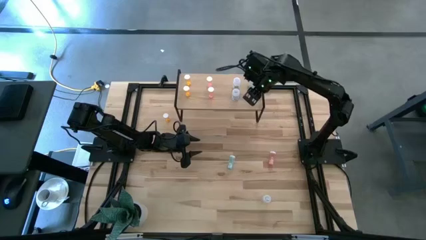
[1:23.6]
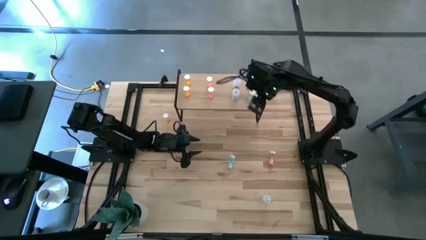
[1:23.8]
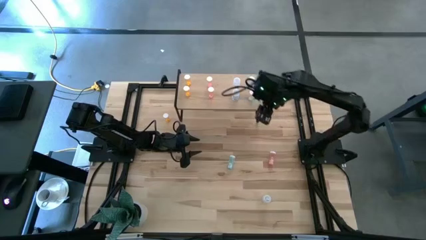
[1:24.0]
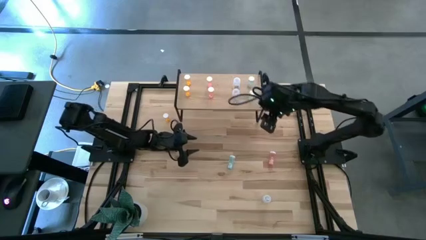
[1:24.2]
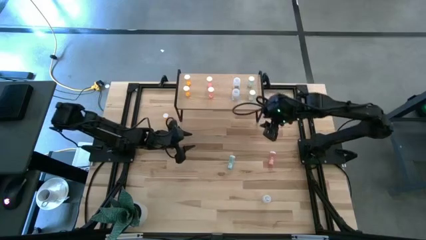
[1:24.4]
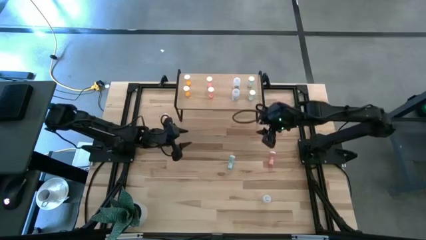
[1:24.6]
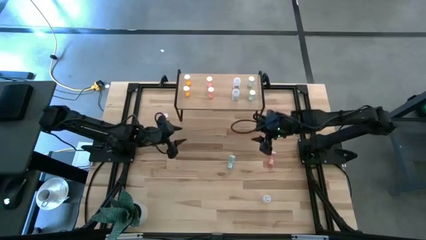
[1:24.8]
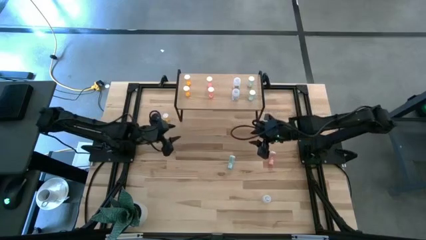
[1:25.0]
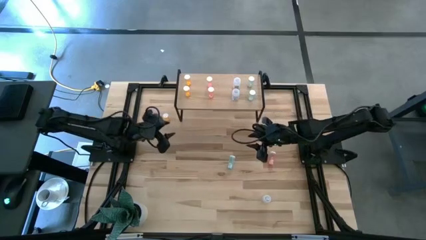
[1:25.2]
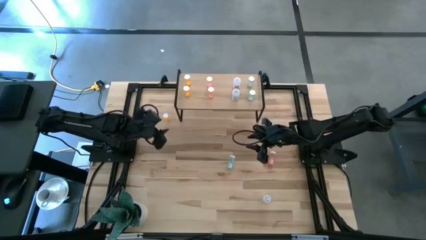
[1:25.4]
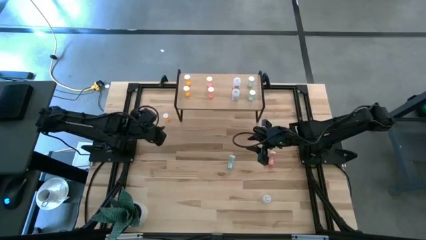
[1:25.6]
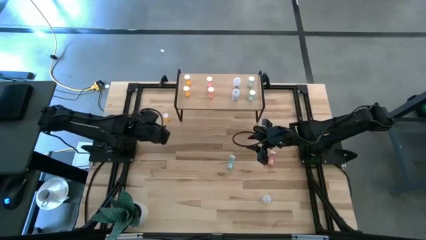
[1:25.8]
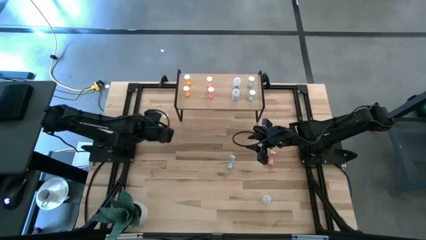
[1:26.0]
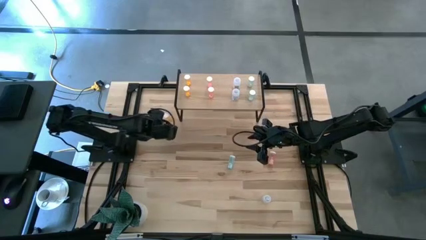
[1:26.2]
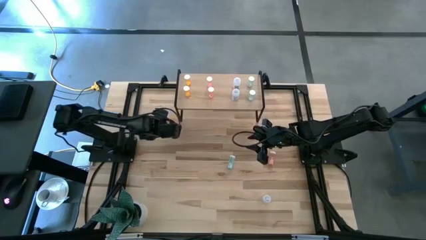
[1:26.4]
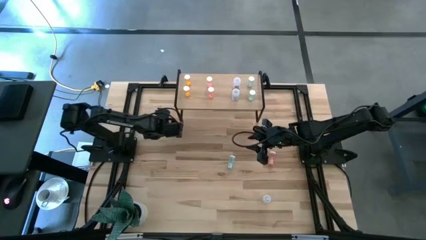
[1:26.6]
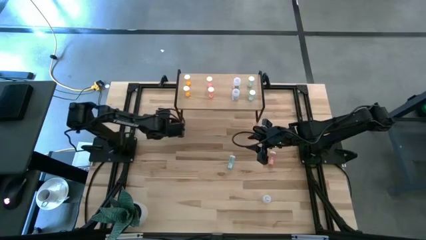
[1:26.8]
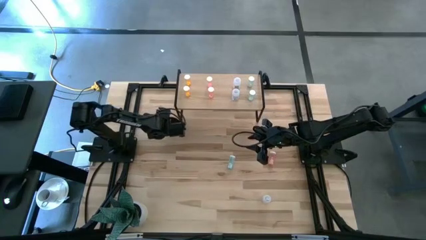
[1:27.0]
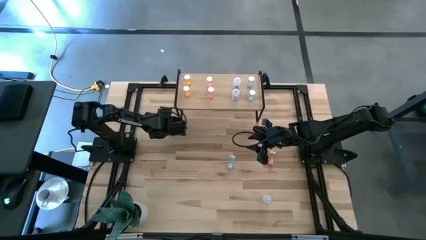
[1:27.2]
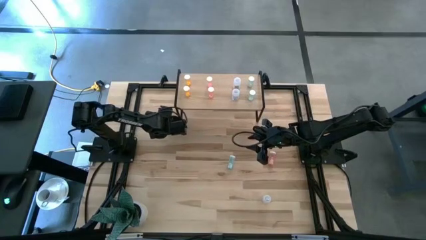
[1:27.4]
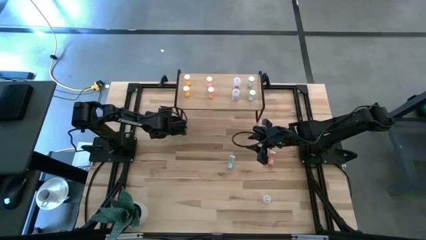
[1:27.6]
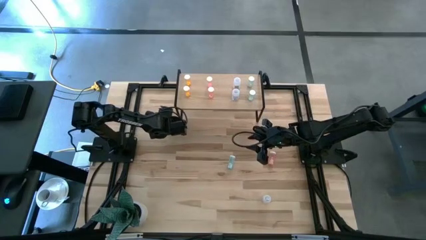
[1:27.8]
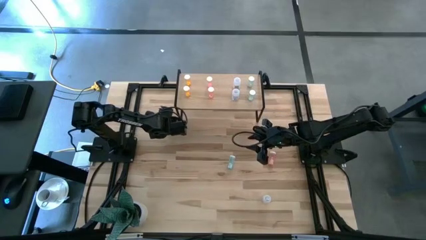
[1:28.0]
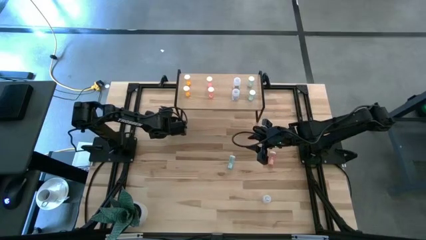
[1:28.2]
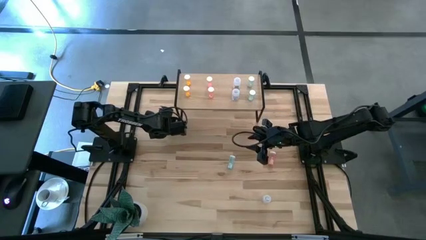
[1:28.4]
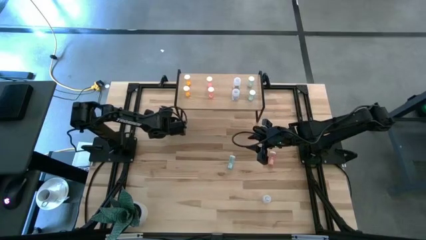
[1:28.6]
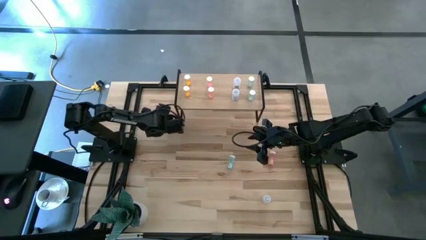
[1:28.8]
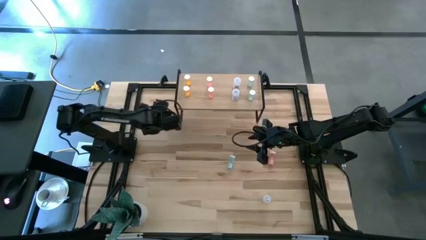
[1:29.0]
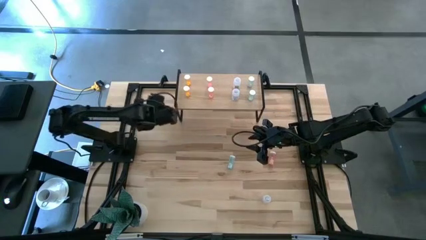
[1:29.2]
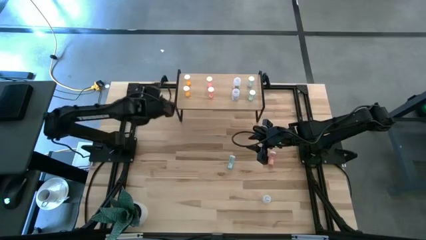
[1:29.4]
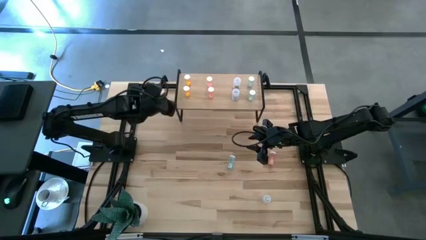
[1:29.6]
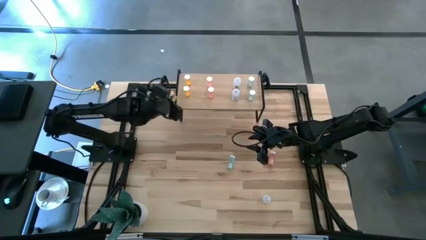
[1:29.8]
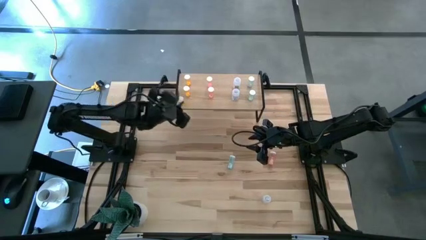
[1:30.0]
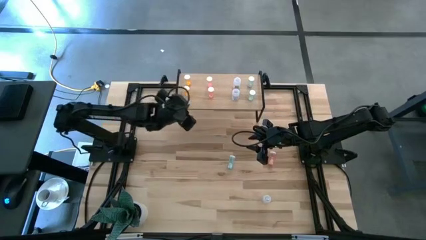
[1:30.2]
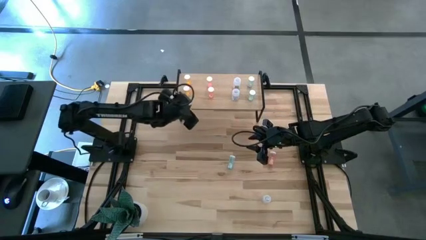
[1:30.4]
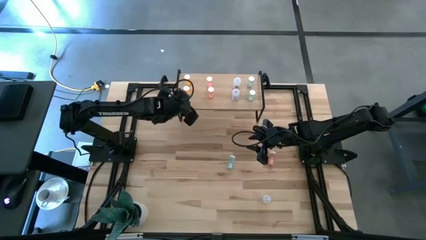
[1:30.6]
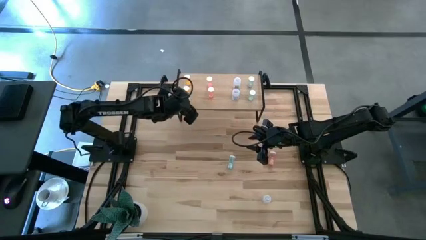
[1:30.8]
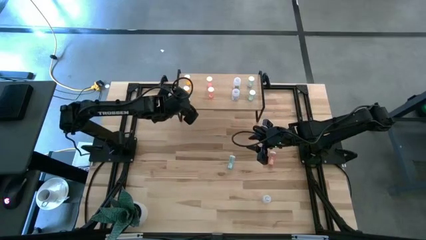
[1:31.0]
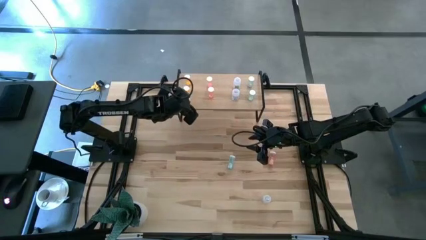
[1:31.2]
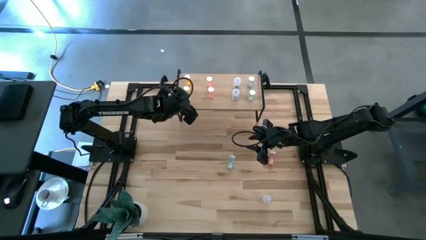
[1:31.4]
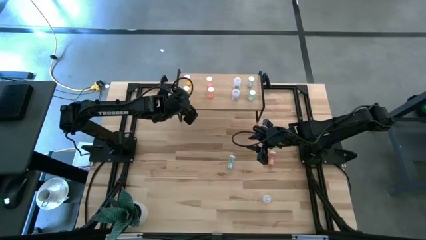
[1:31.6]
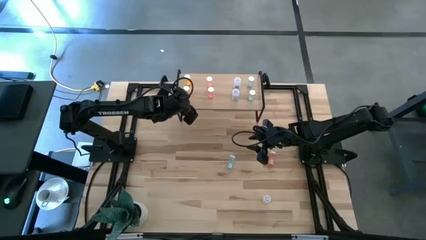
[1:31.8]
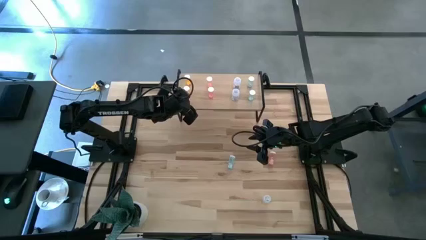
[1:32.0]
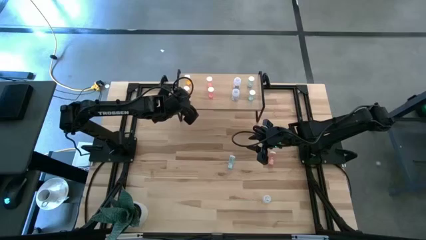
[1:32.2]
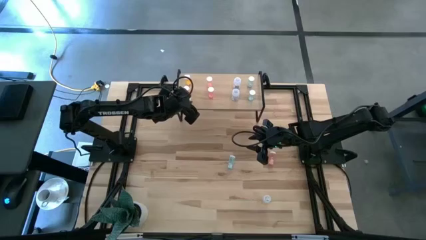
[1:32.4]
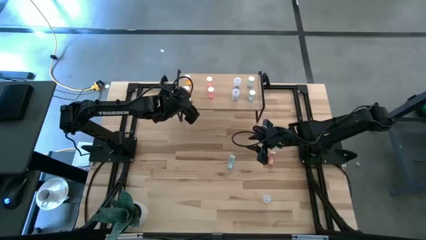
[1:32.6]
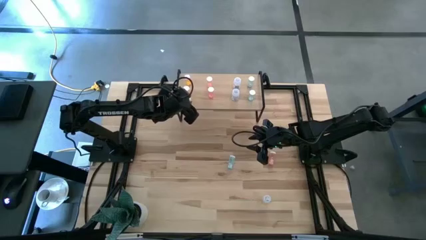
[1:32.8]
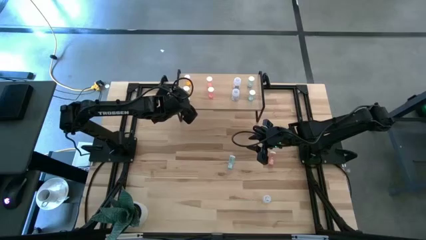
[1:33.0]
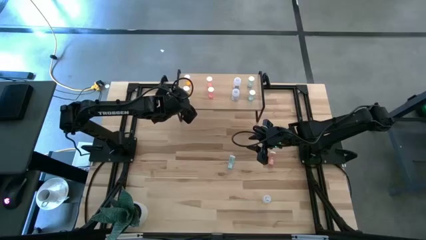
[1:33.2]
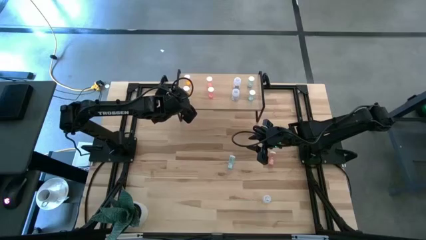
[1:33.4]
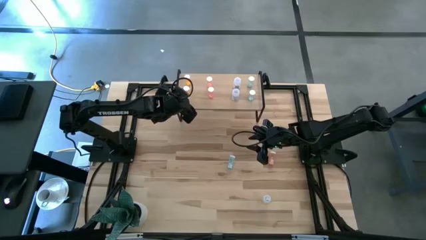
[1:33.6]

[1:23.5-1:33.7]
Task: Pick and place medicine bottles onto shelf by color
Align the orange pill bottle with the other orange pill bottles on the shelf

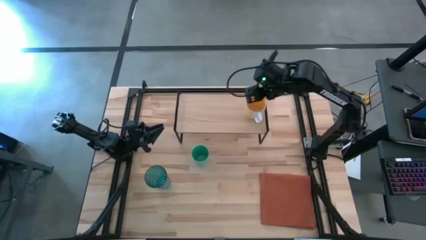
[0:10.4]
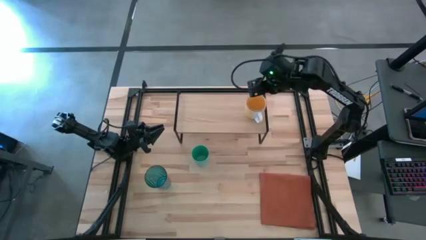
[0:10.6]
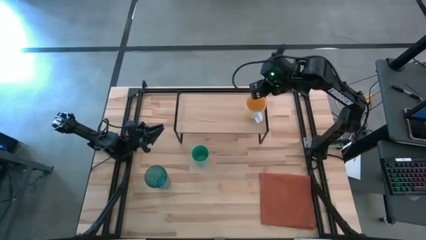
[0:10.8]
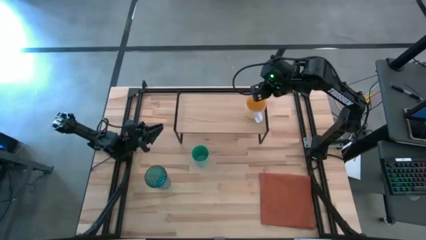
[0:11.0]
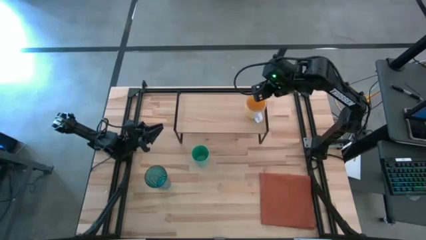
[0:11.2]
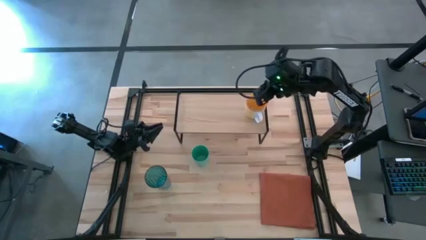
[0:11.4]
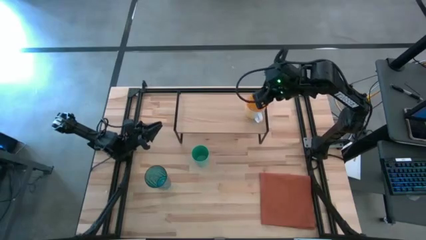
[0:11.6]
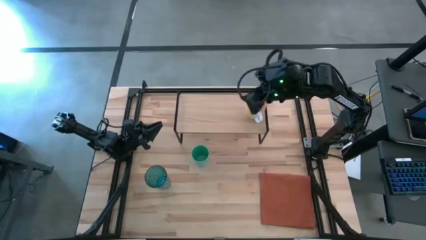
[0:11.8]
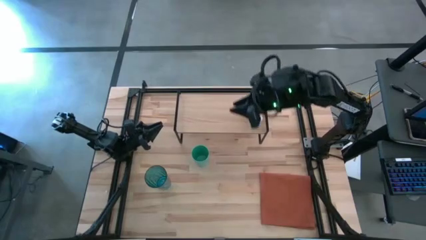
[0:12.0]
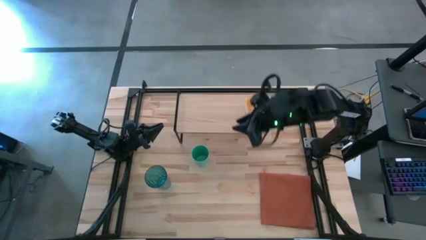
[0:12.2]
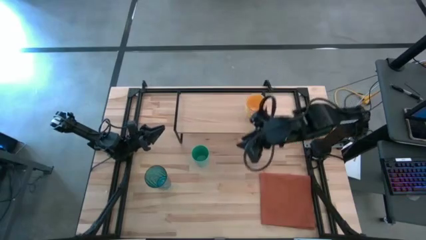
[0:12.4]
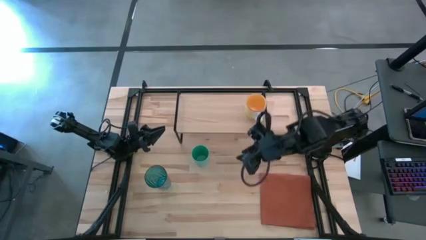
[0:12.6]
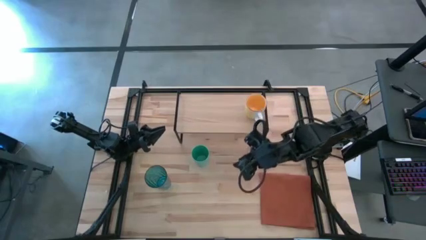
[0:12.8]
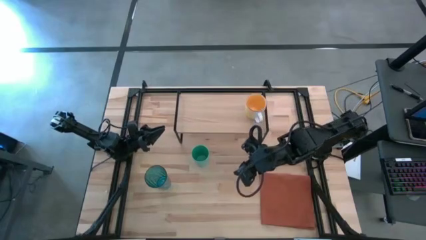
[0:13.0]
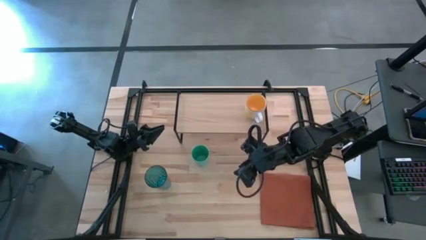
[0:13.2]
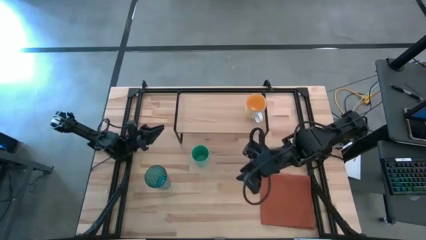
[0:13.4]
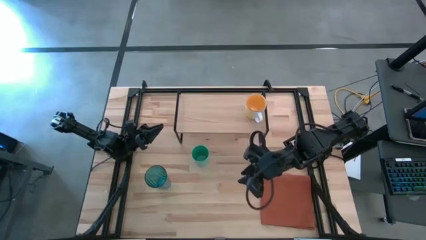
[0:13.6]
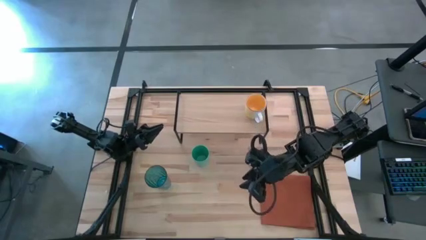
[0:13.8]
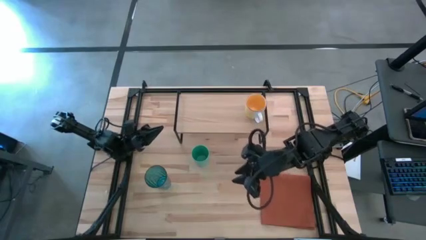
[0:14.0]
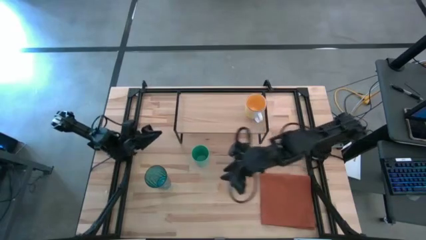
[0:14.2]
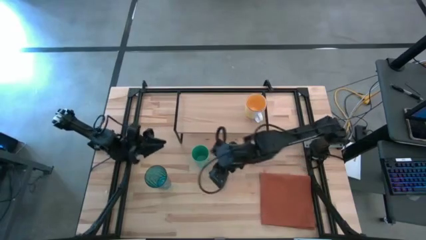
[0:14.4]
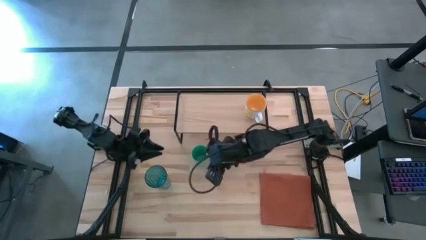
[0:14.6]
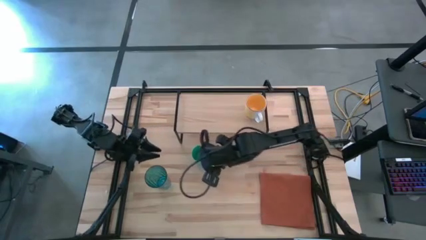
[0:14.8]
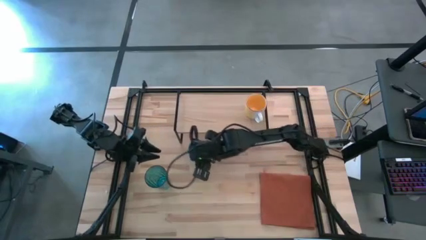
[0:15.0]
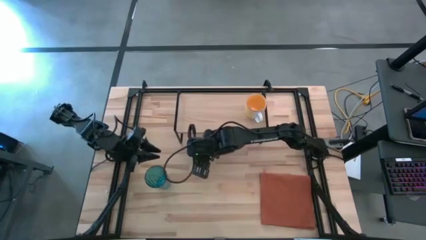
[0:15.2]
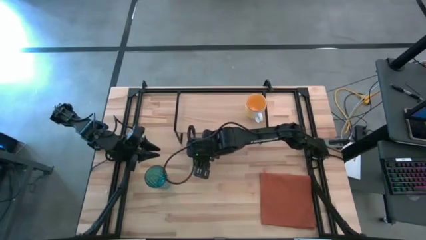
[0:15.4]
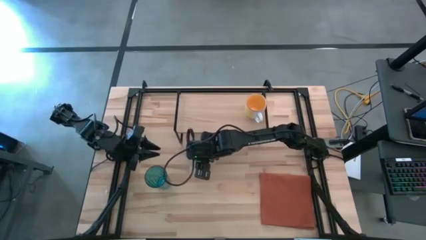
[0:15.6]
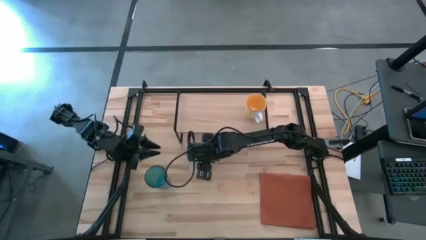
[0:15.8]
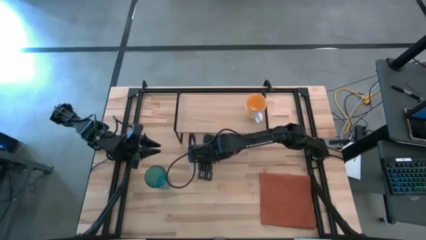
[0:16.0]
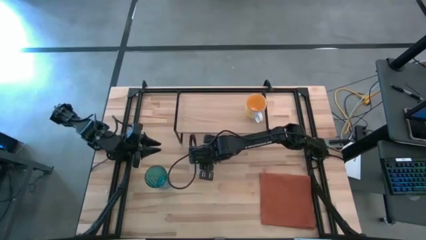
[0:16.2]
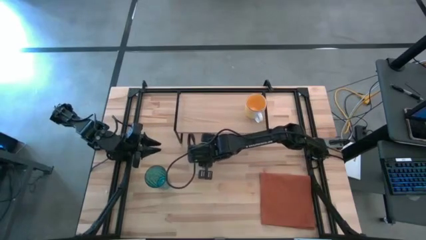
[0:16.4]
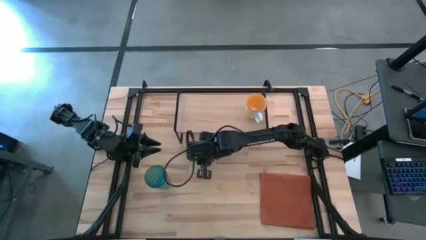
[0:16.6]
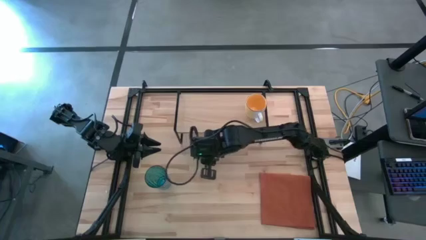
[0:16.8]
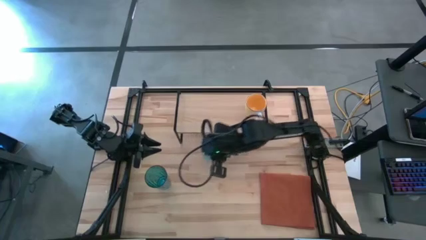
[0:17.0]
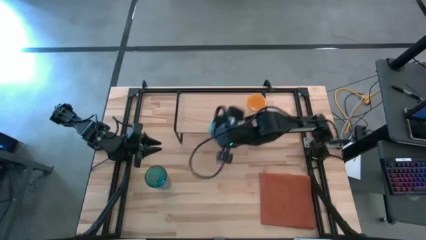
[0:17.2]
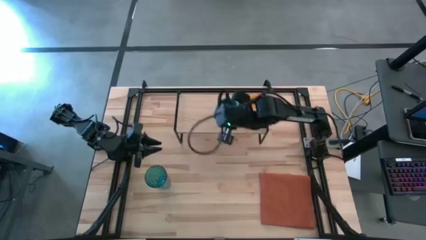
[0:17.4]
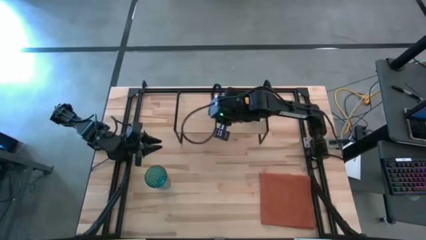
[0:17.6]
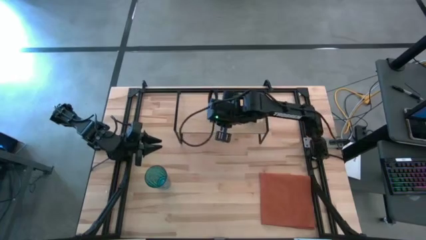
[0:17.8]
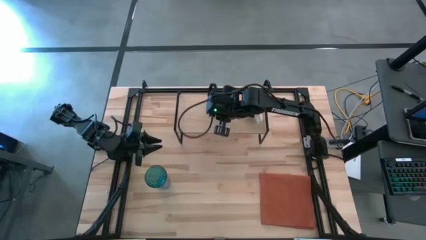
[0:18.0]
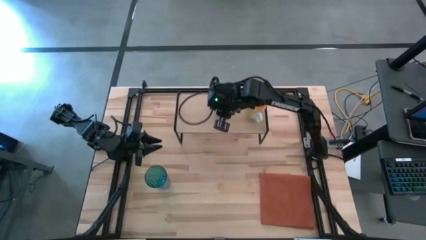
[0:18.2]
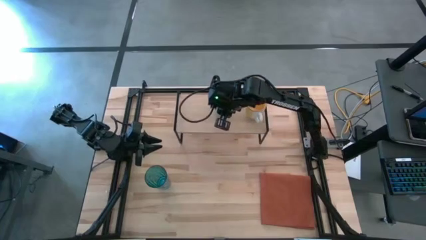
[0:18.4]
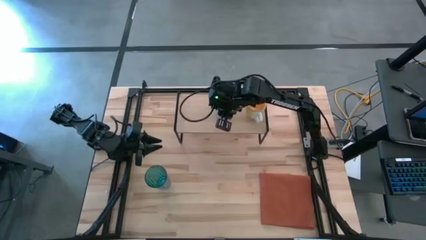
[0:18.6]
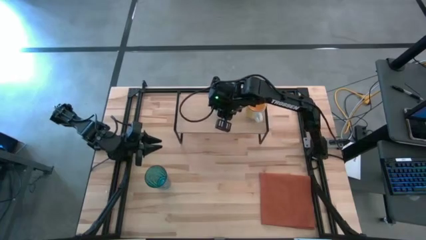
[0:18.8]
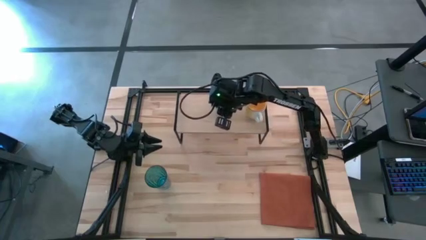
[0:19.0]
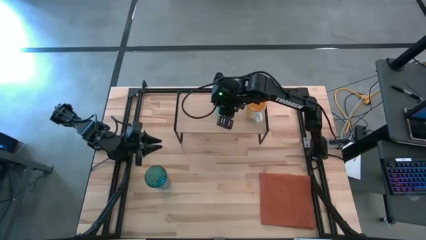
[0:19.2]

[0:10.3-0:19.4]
Task: Stack small to large cups/mugs on shelf
Put the light blue cup on the shelf
